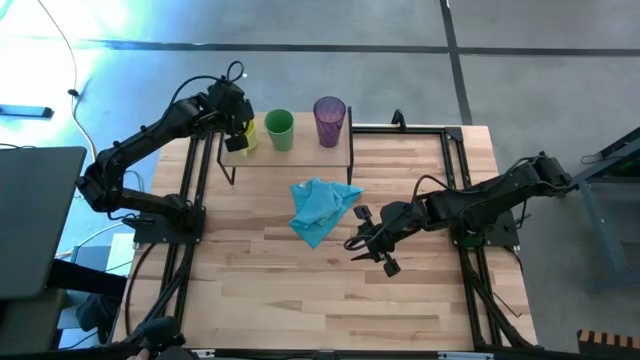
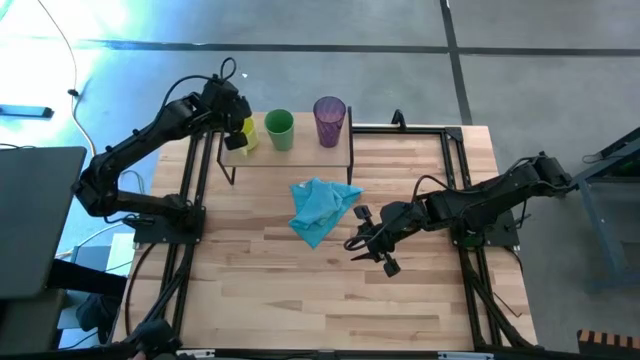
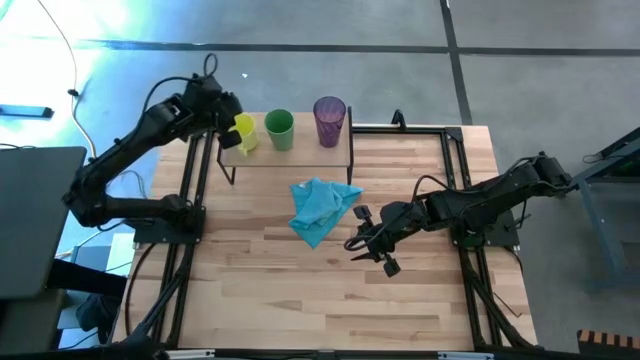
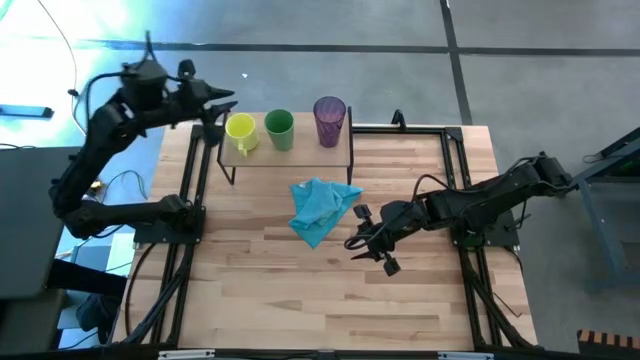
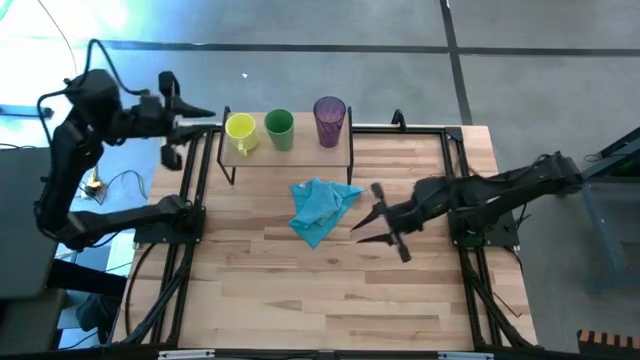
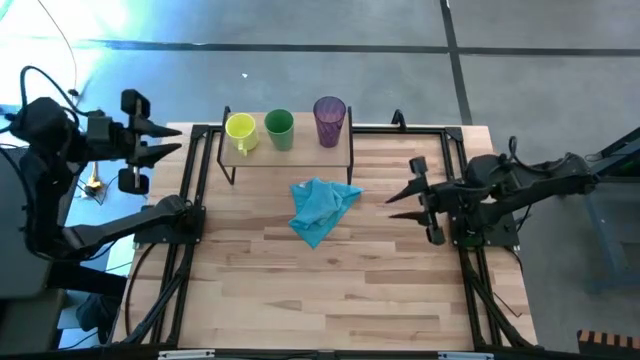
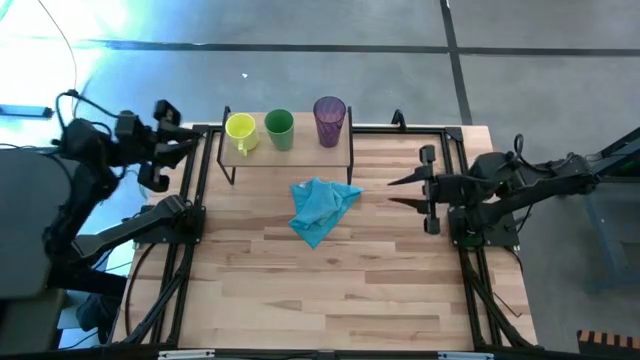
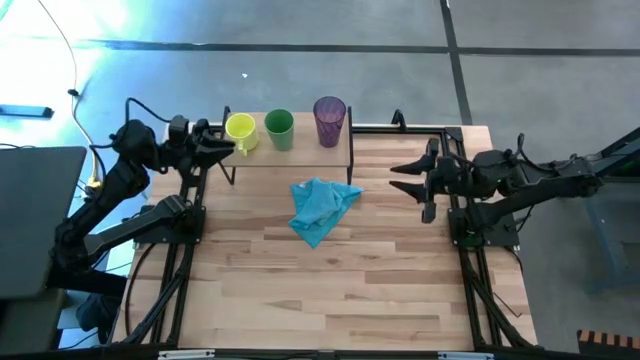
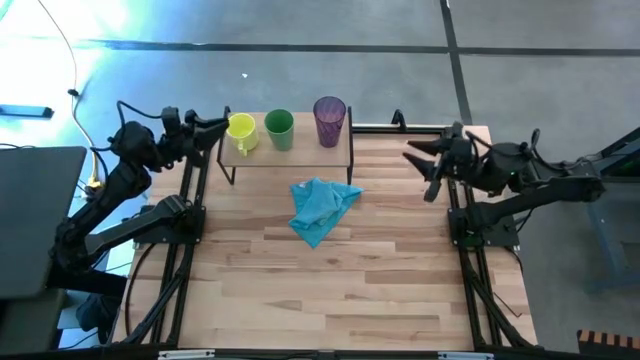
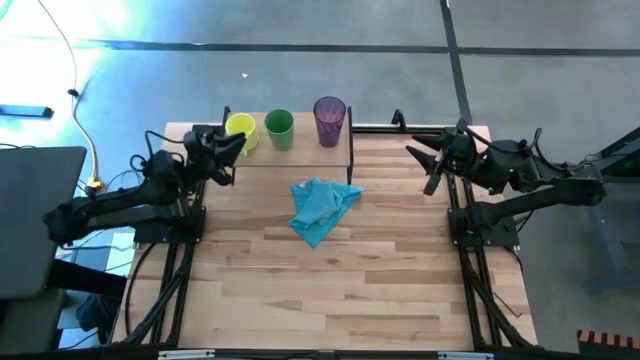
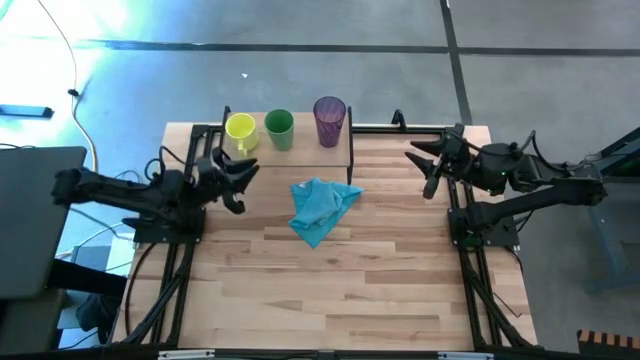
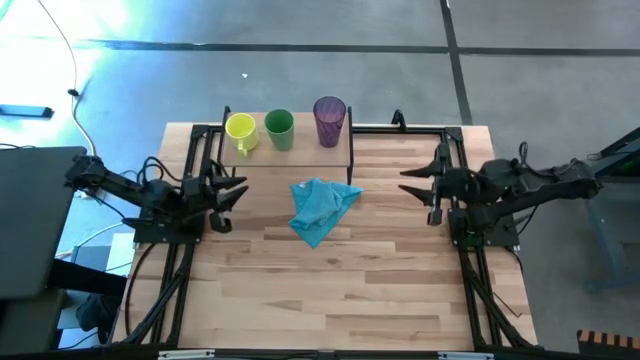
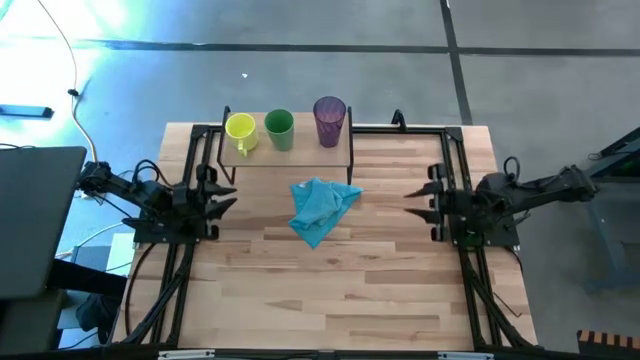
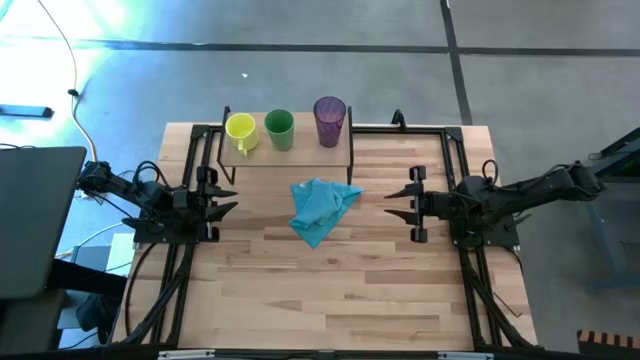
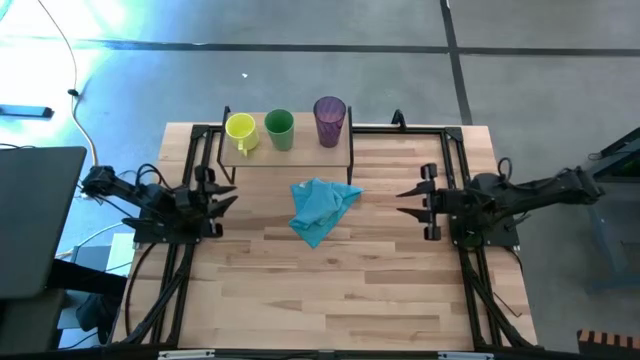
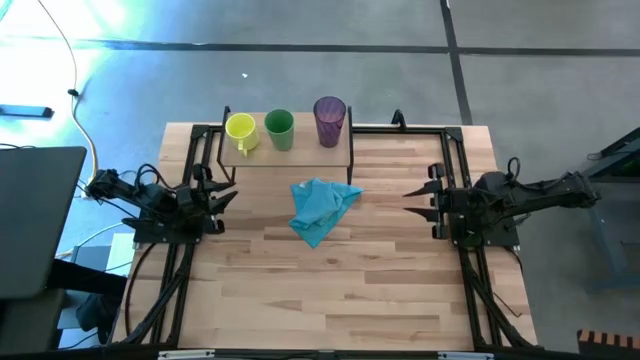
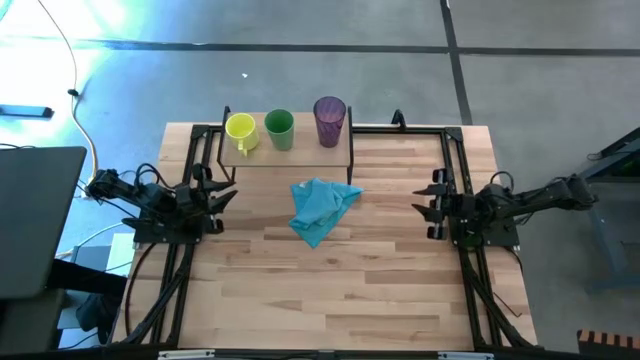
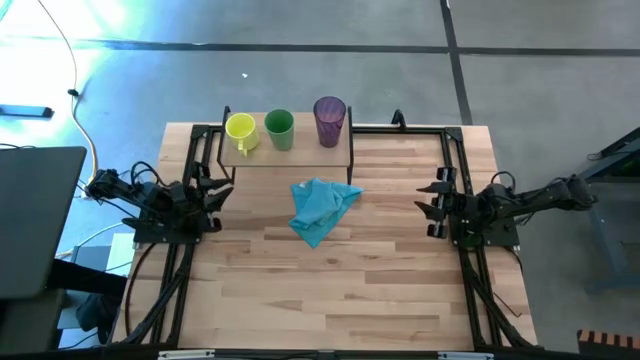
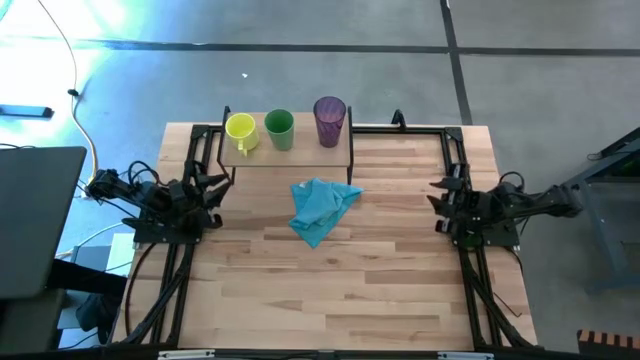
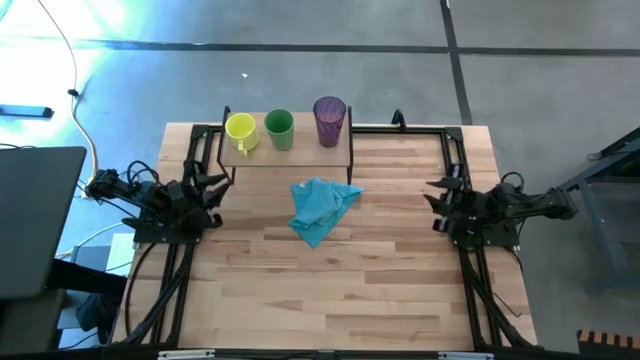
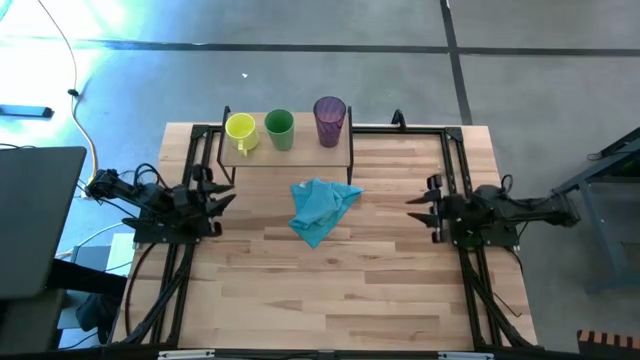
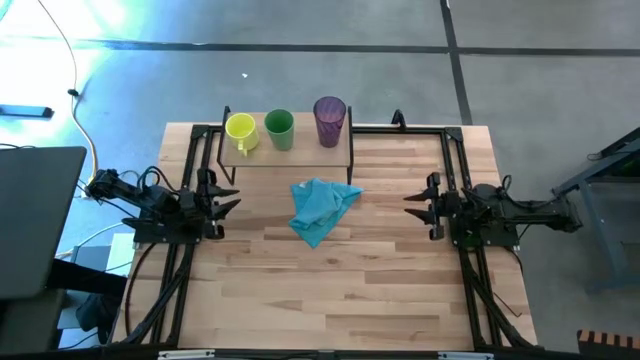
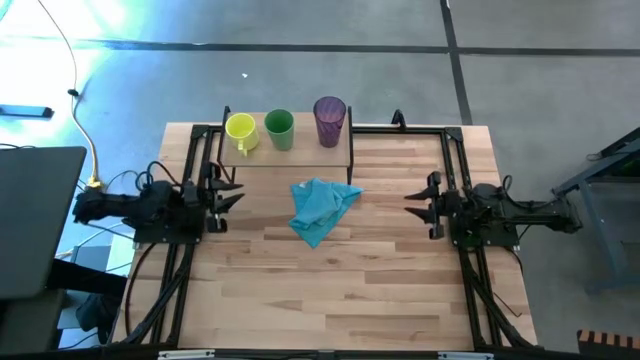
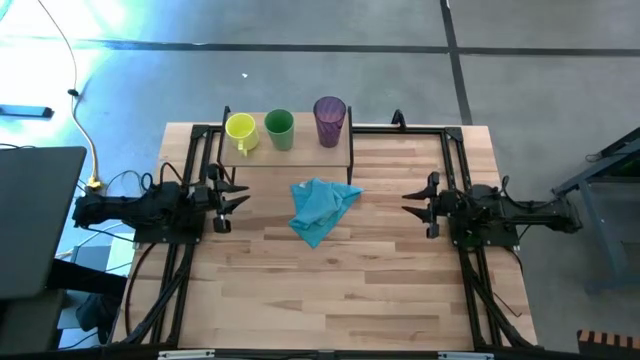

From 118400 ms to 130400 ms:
Task: Stack small to large cups/mugs on shelf
Return to Home Position

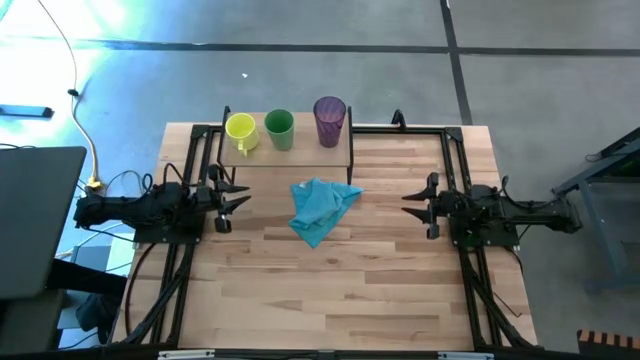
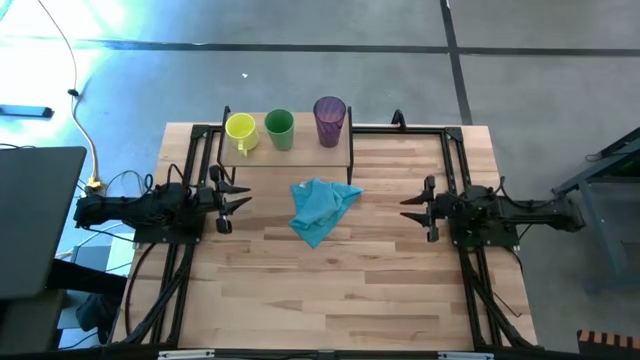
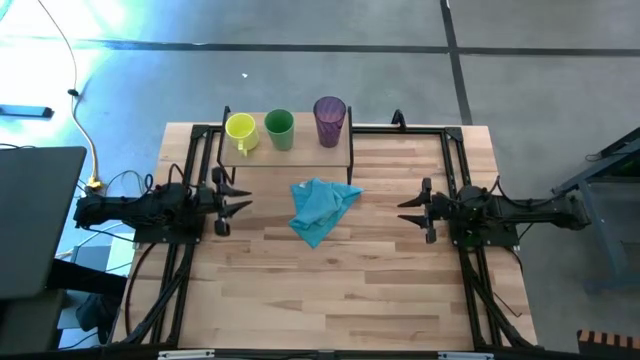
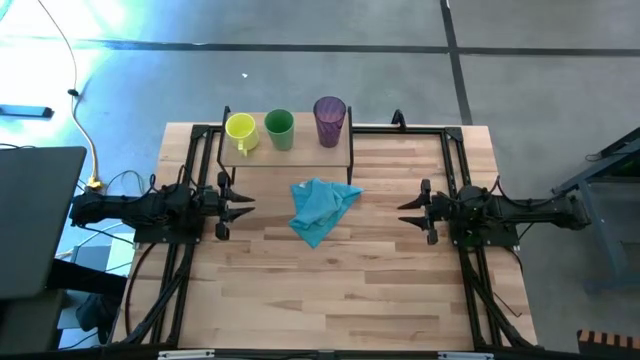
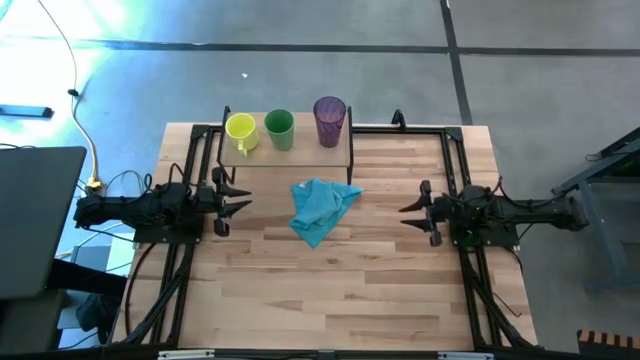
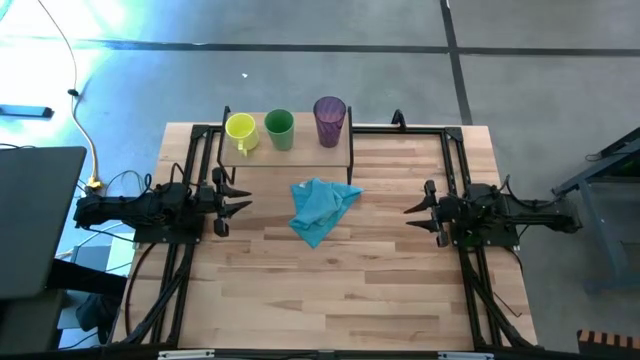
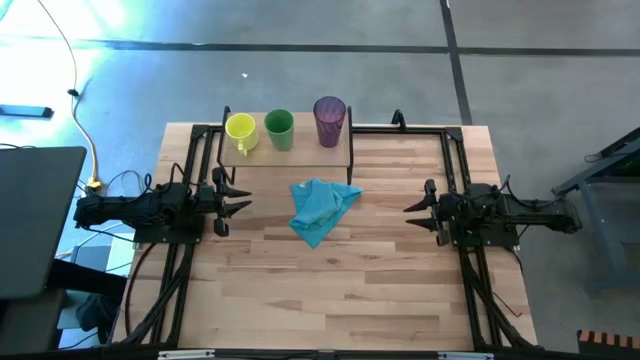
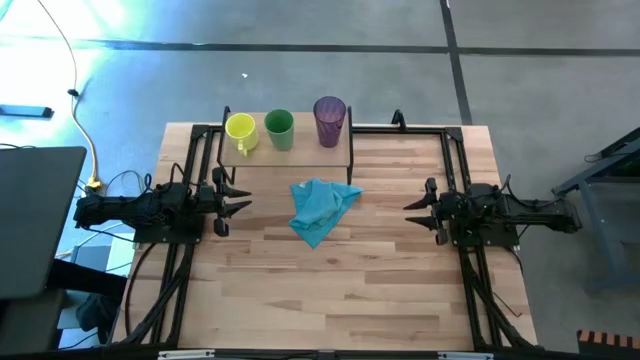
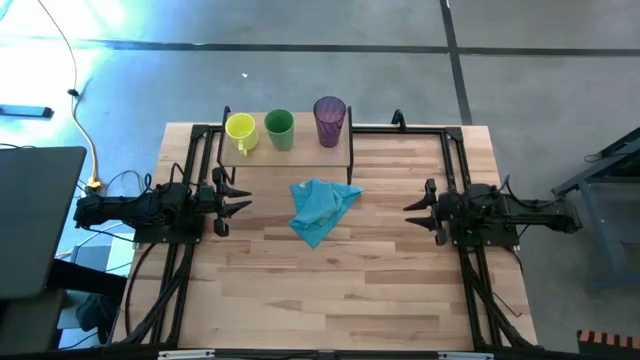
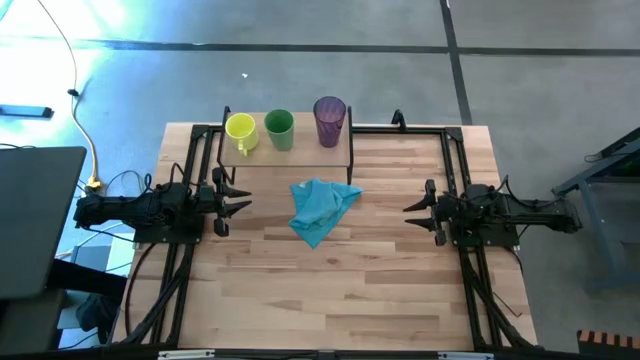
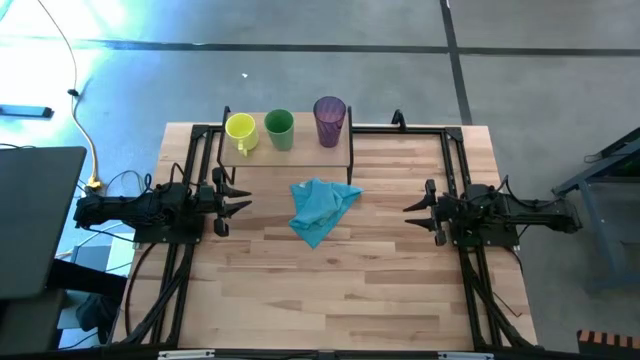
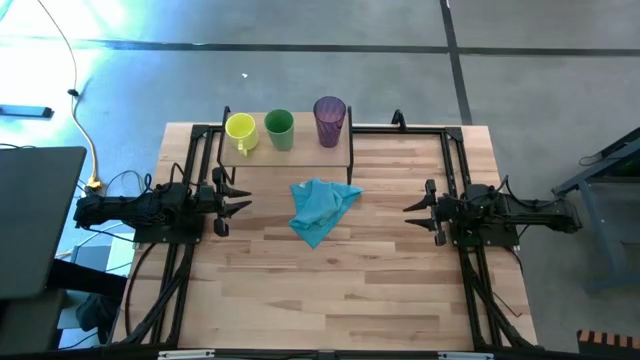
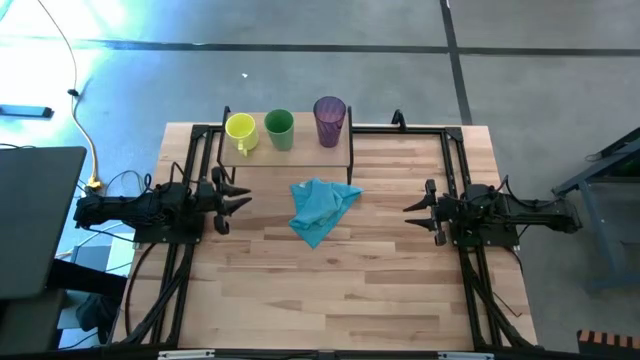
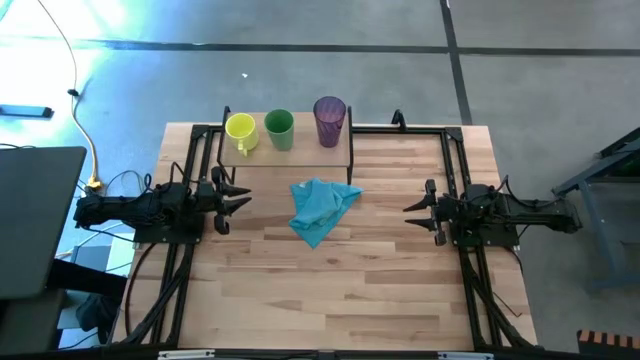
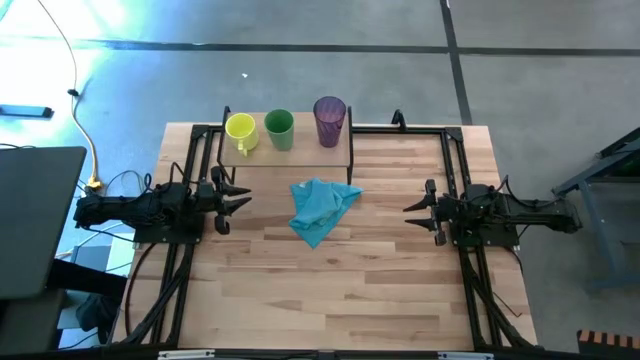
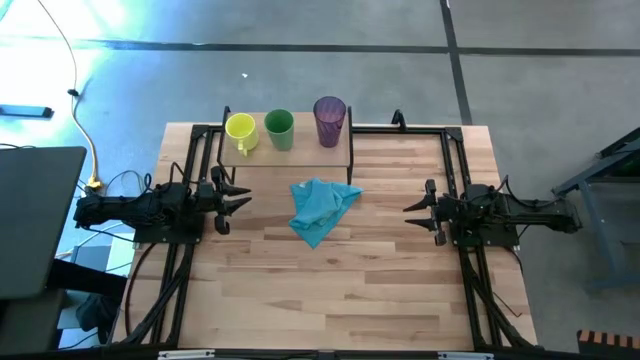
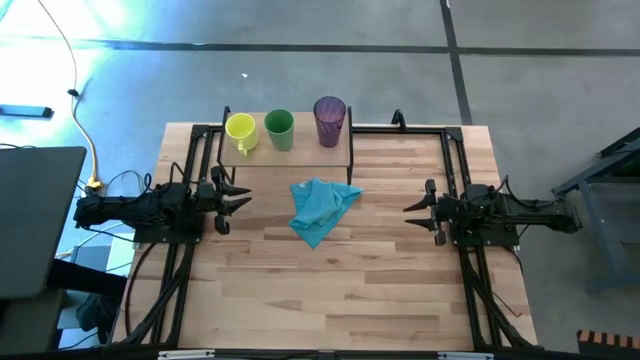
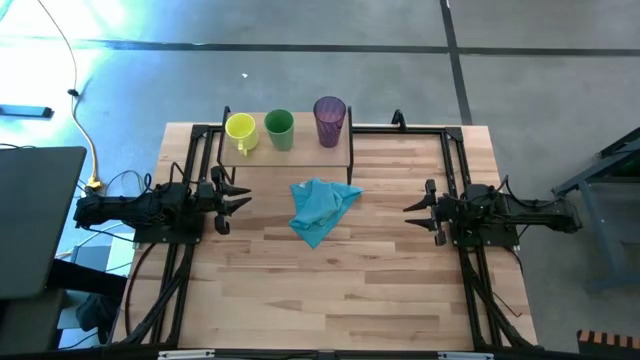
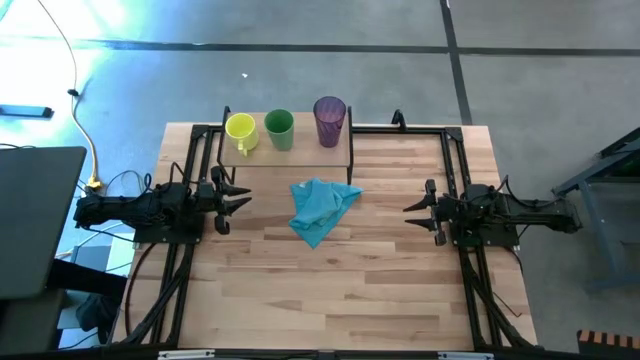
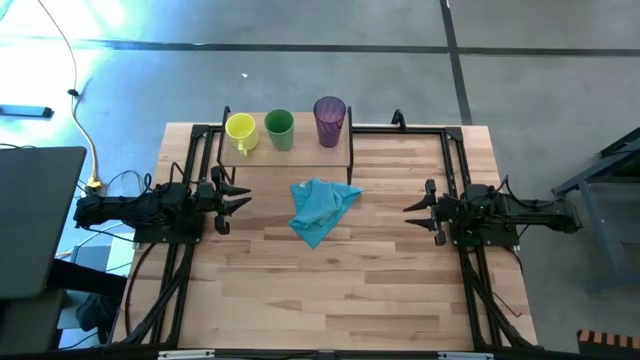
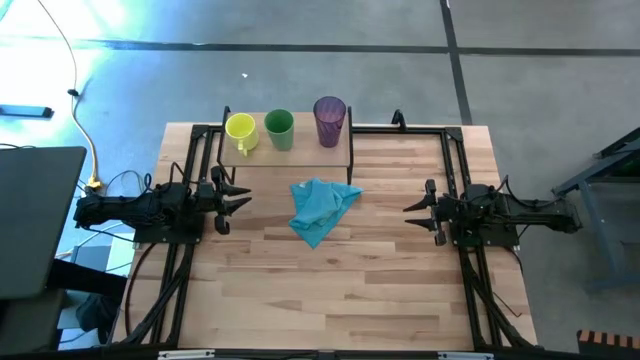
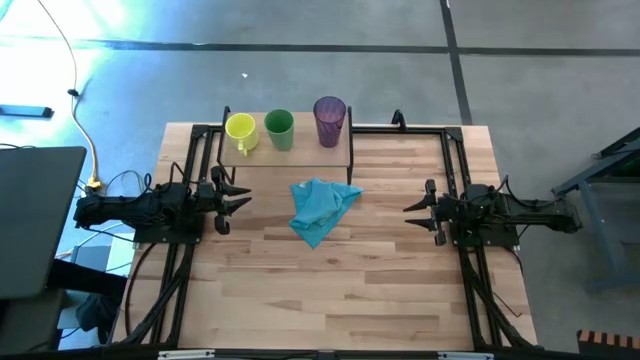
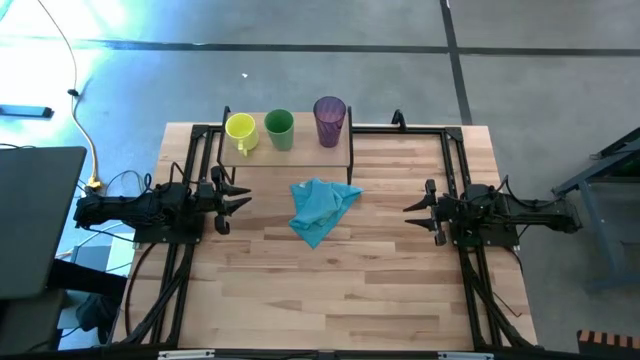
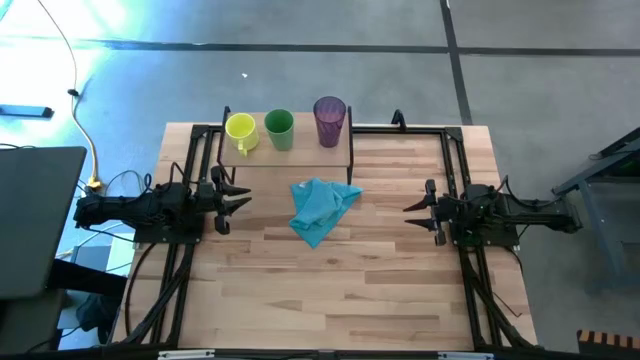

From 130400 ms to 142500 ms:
Return to Home Position
